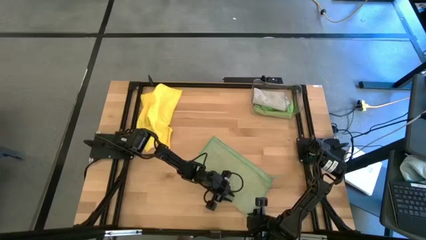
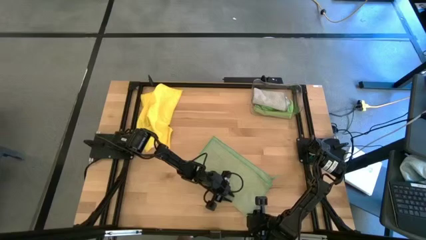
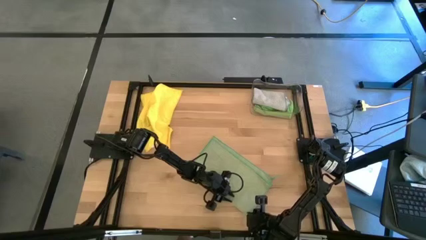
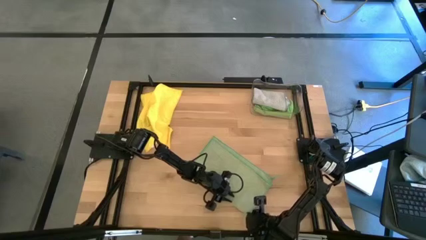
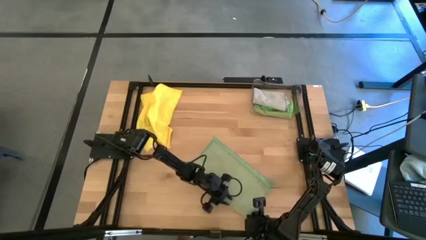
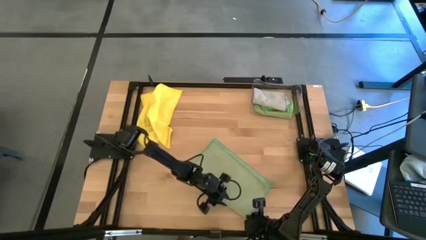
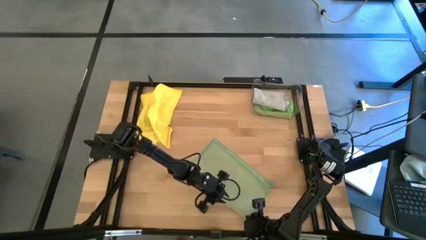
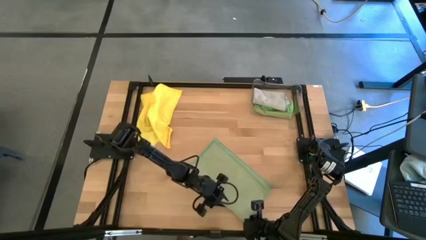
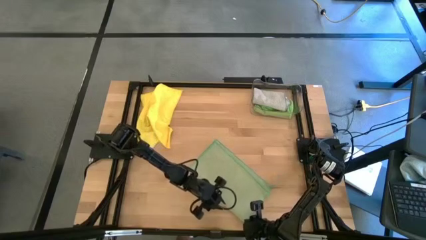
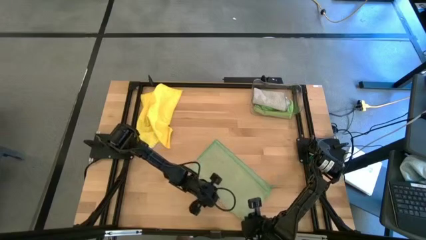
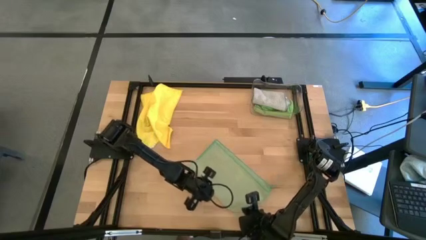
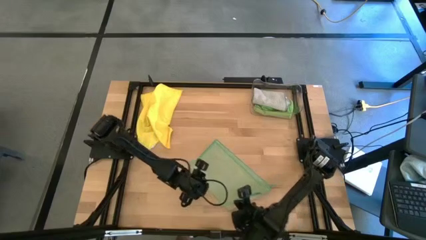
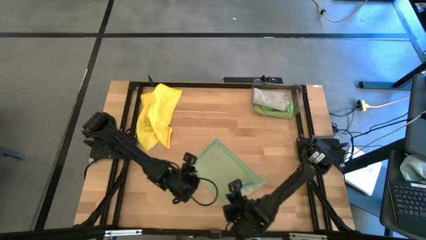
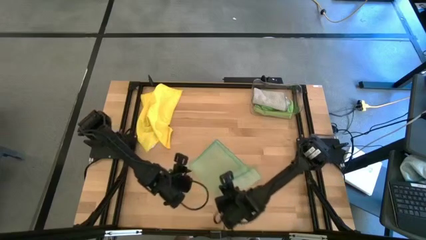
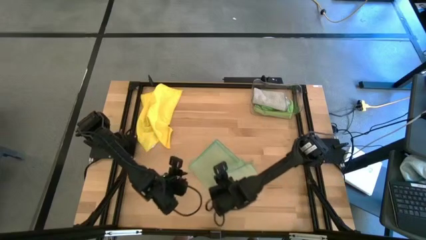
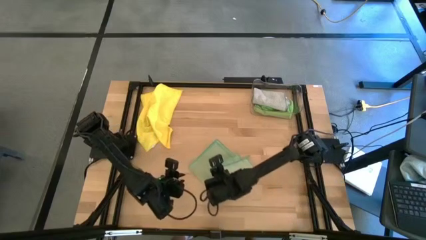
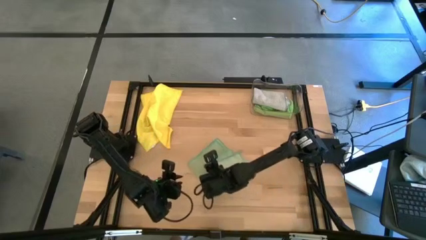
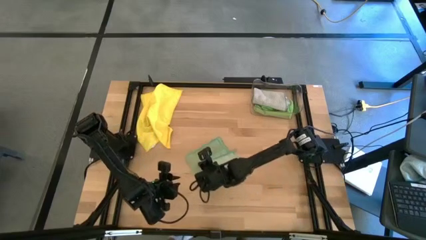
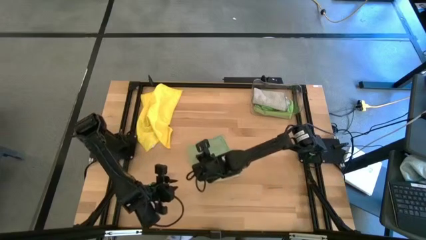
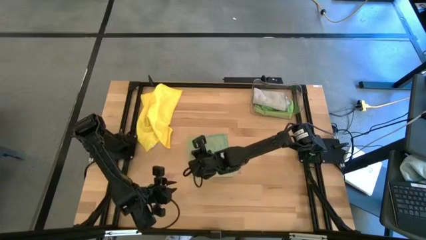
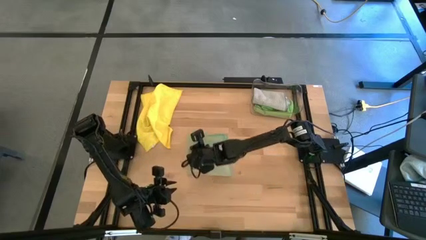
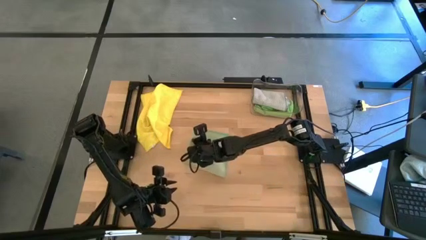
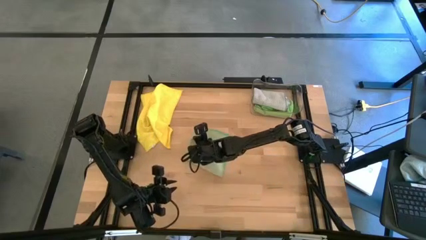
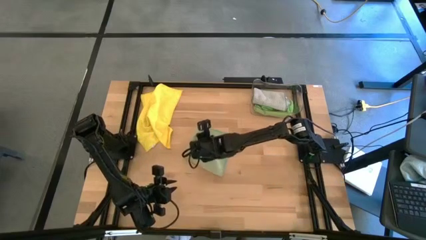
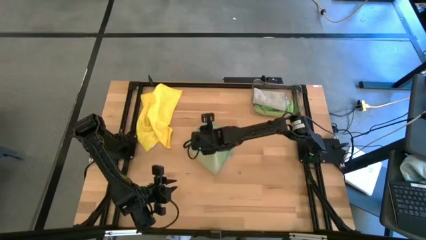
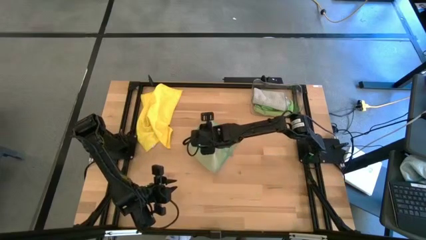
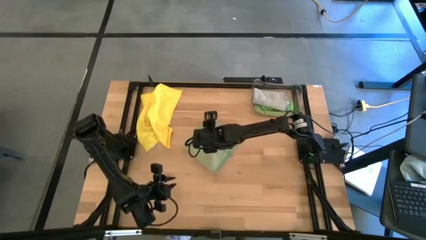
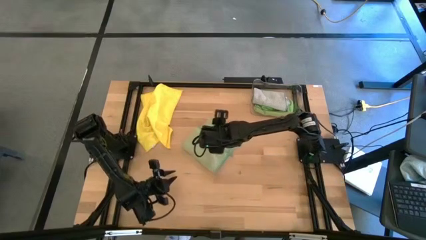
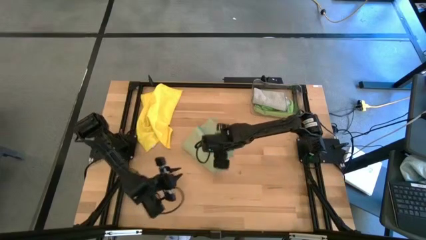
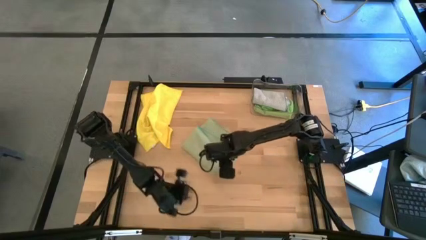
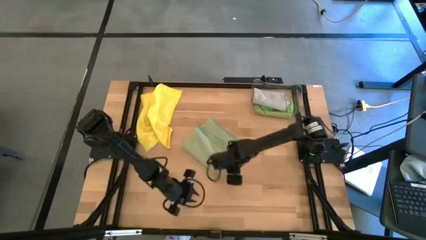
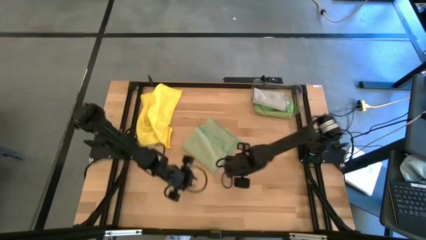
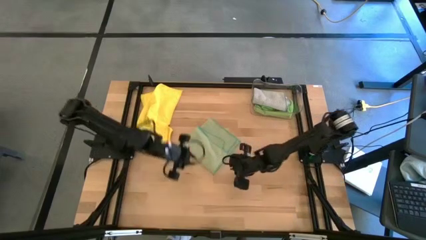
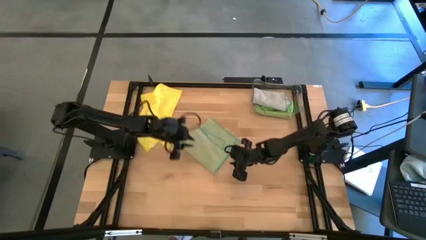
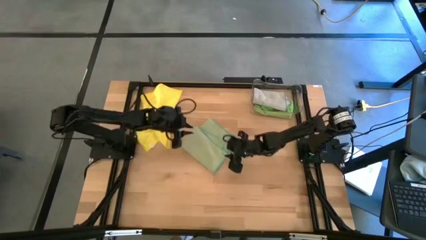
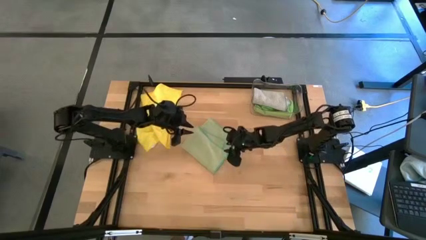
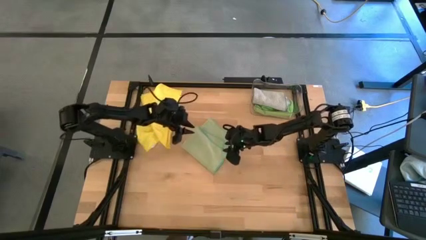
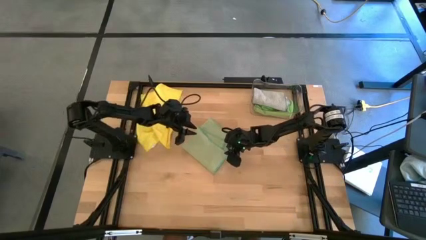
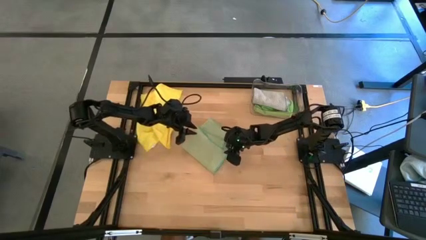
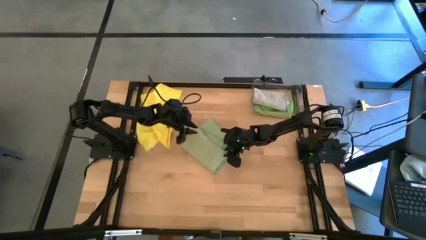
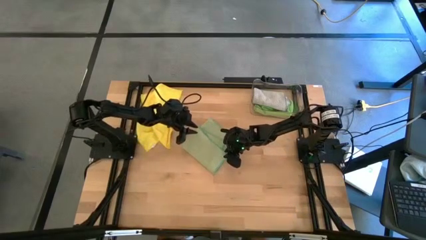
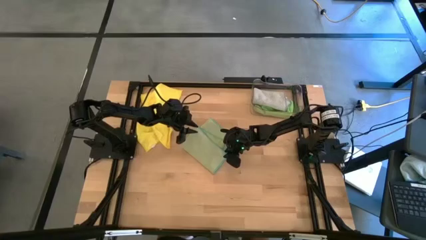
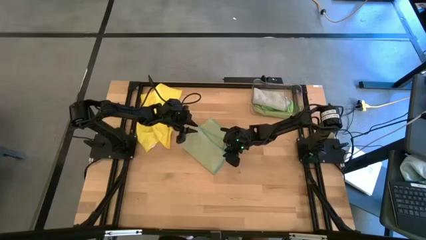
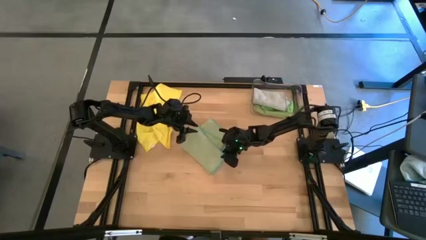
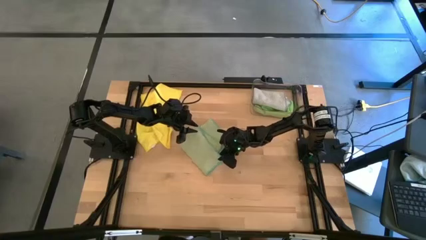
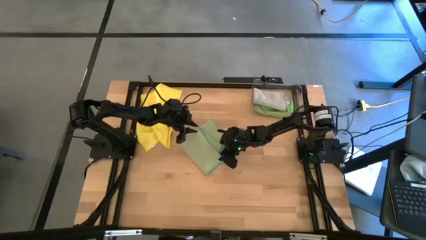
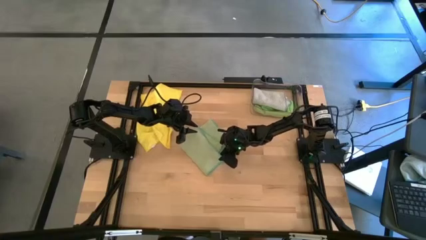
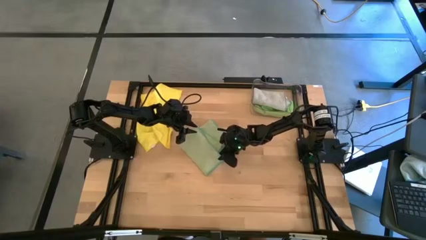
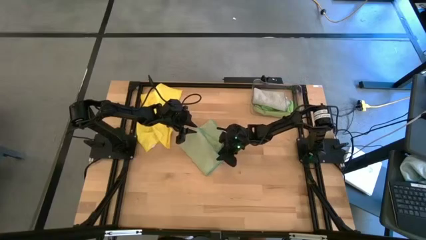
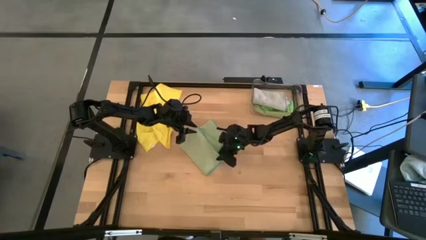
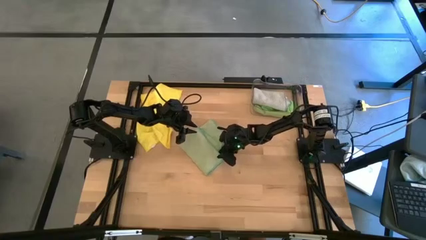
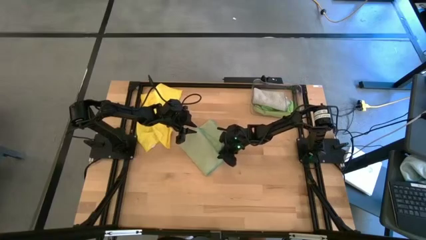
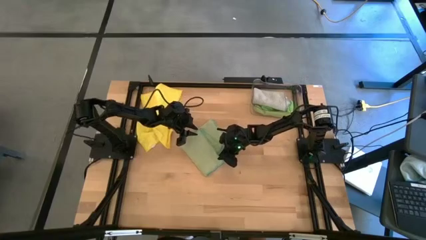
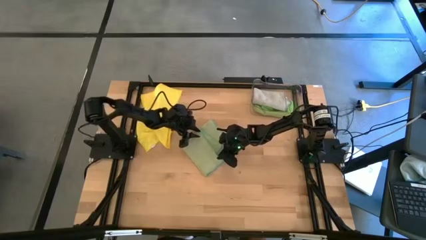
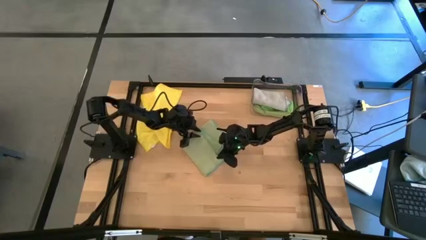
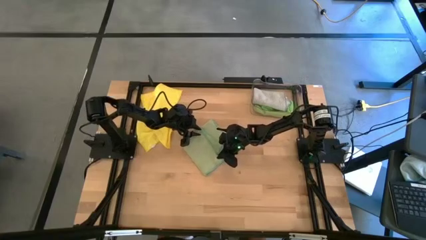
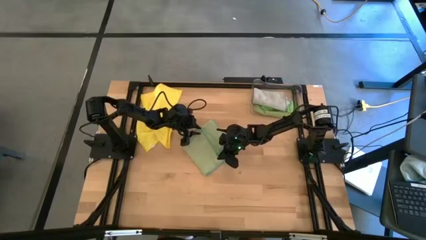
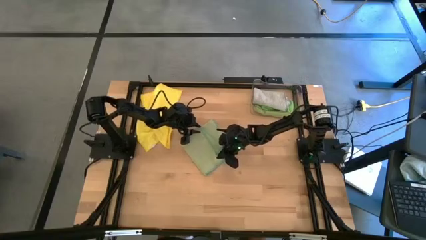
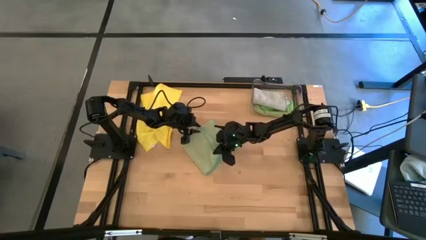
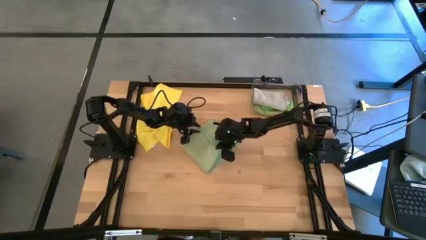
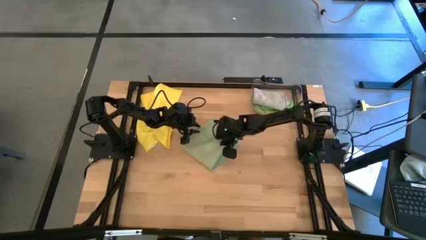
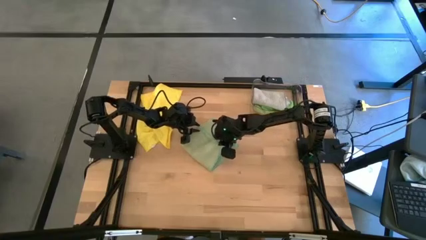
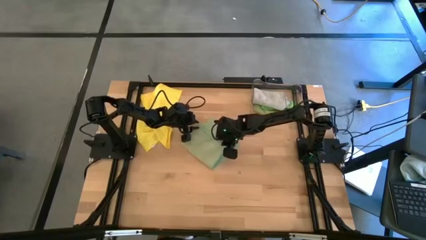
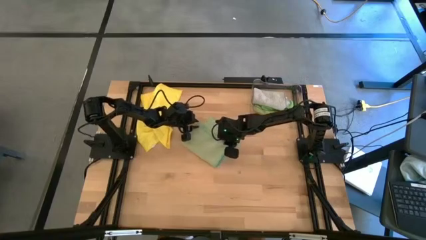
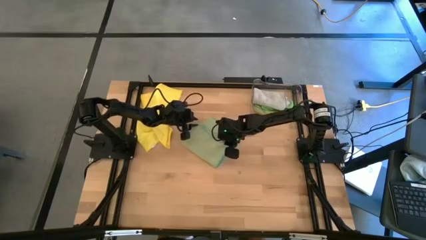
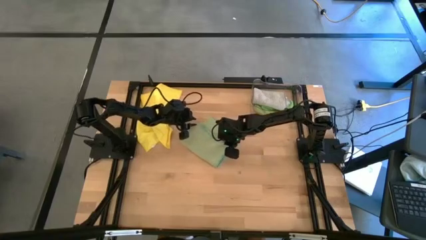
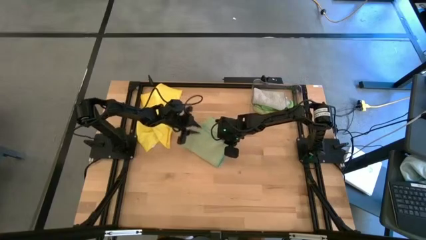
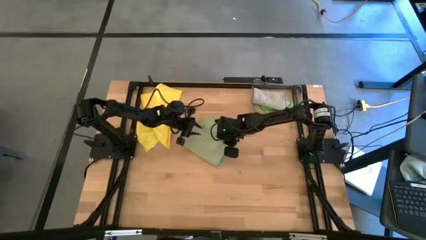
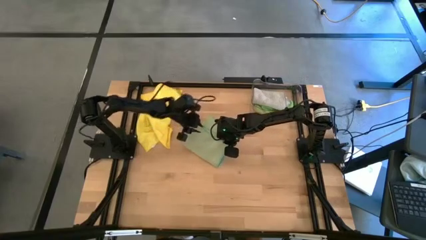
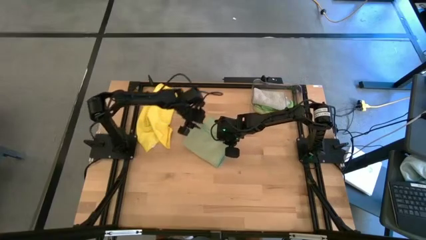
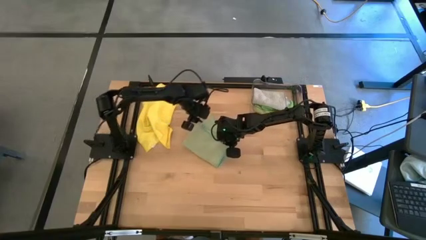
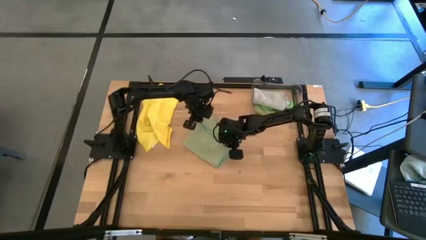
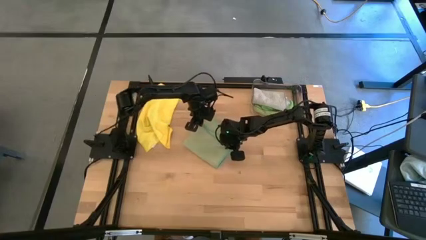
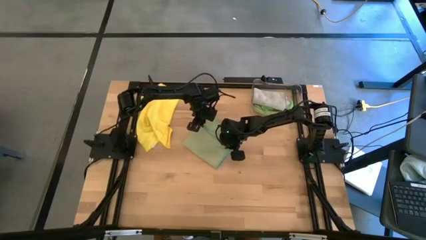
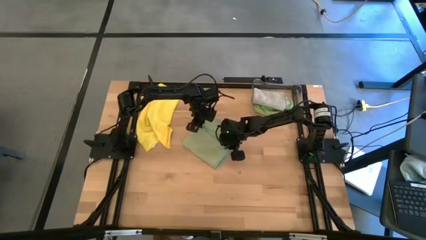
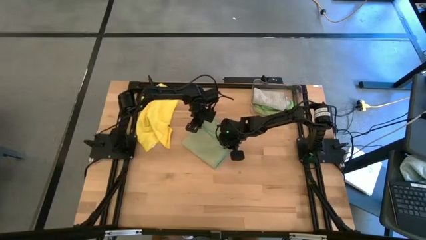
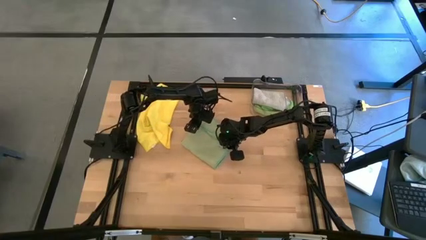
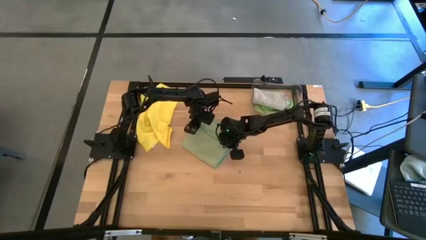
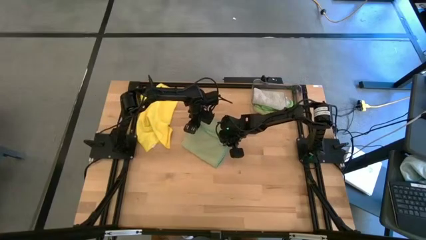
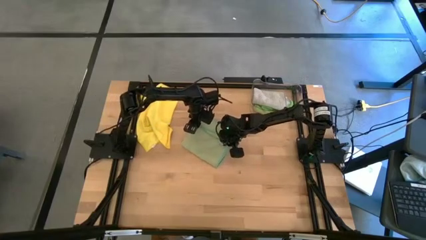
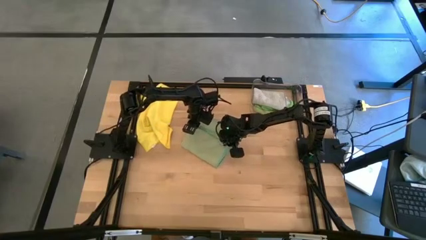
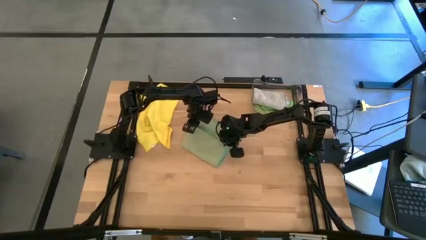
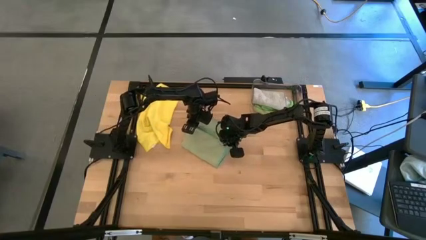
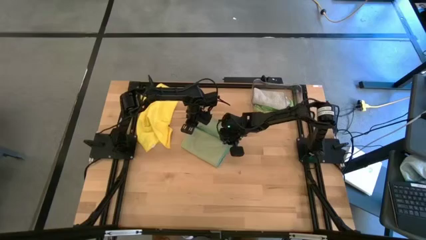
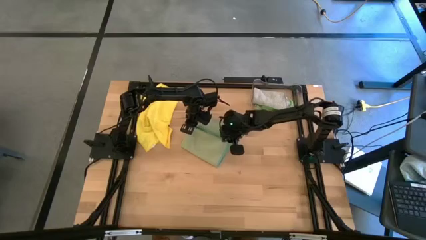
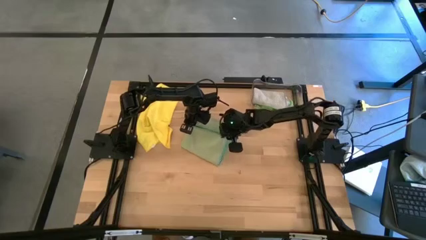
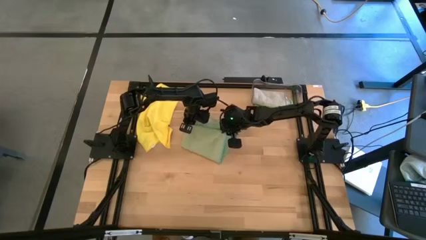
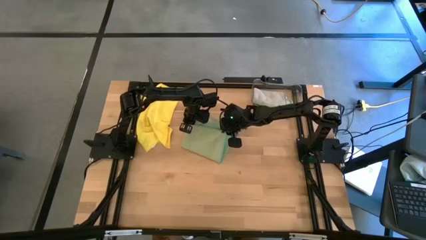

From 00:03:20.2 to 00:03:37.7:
Task: Fold microfiber towels
Fold the light green cloth
